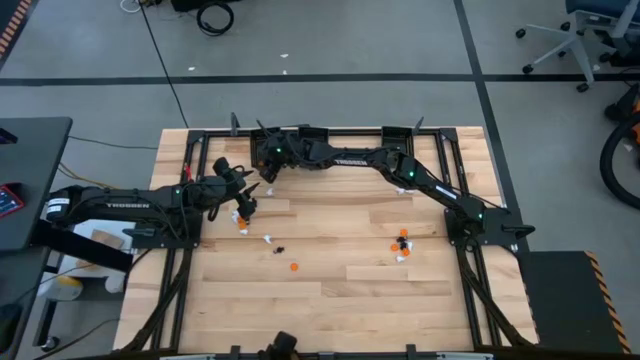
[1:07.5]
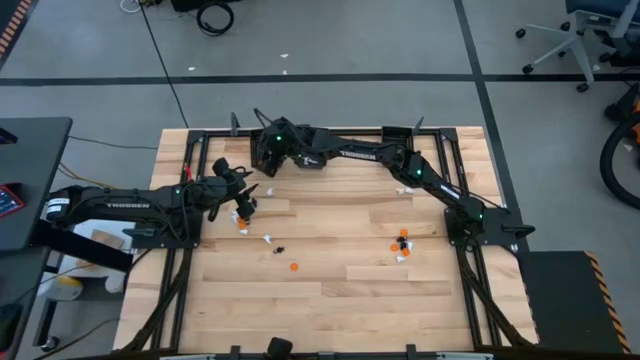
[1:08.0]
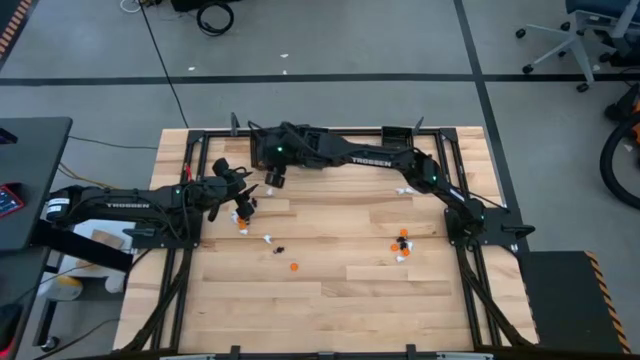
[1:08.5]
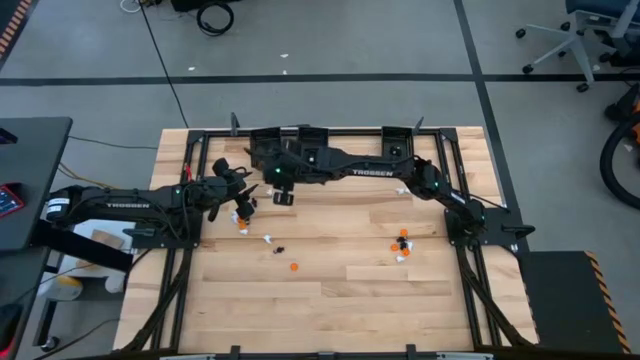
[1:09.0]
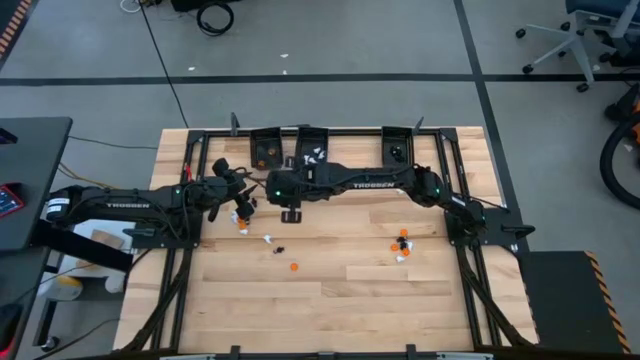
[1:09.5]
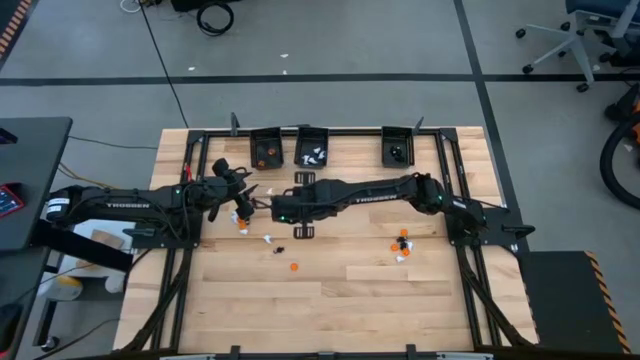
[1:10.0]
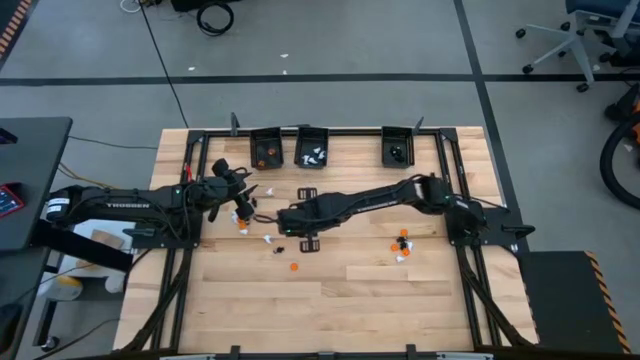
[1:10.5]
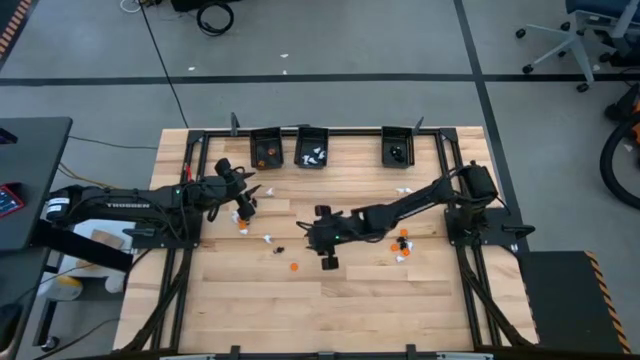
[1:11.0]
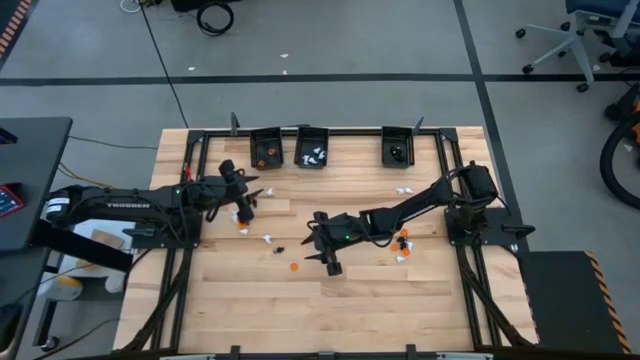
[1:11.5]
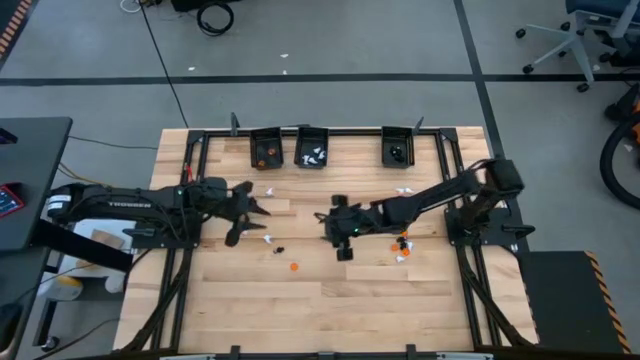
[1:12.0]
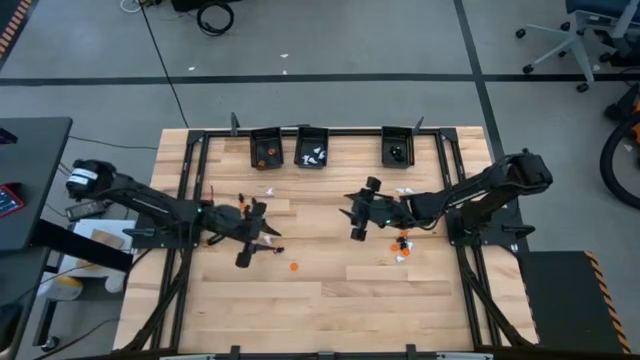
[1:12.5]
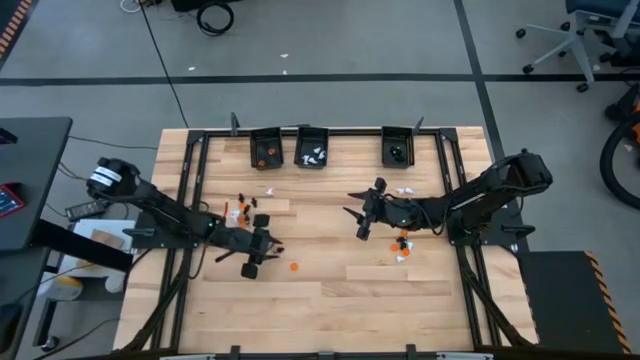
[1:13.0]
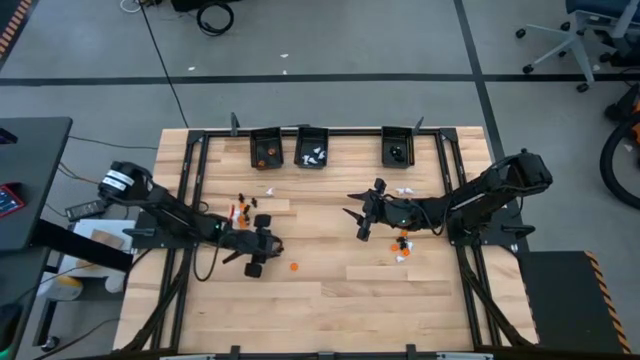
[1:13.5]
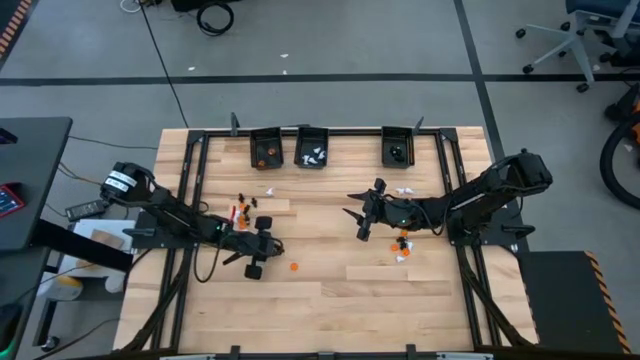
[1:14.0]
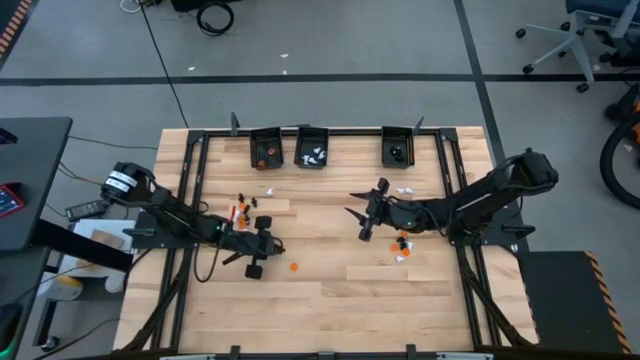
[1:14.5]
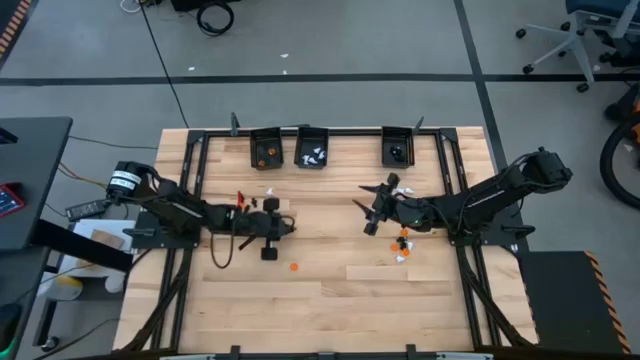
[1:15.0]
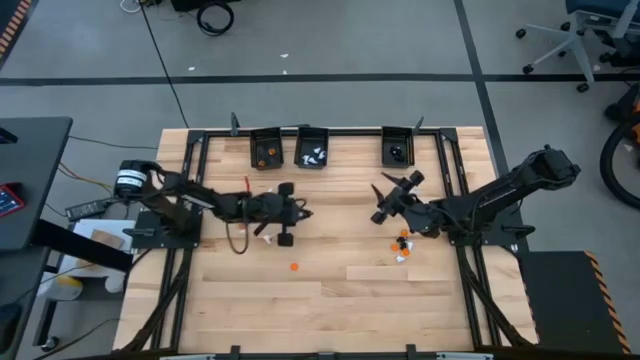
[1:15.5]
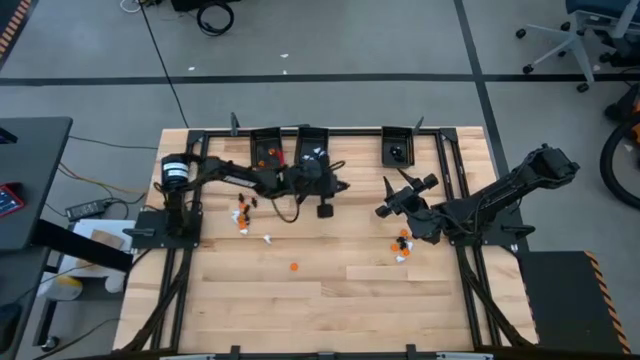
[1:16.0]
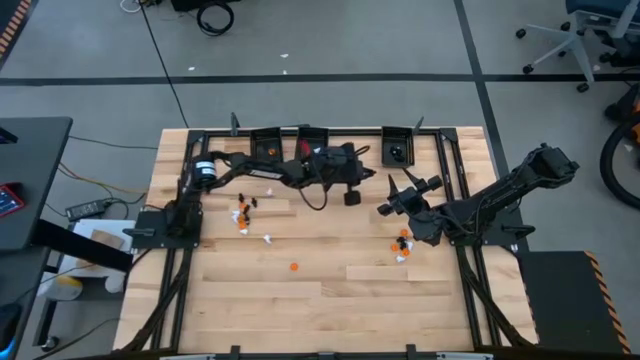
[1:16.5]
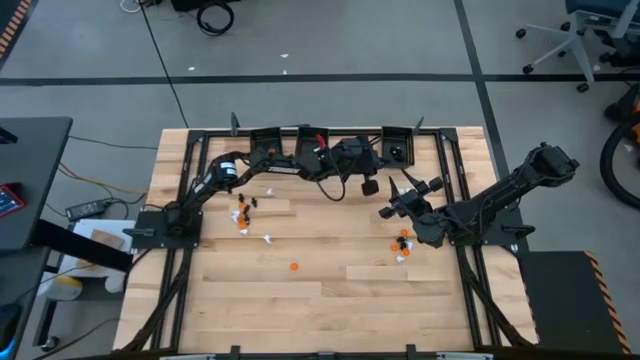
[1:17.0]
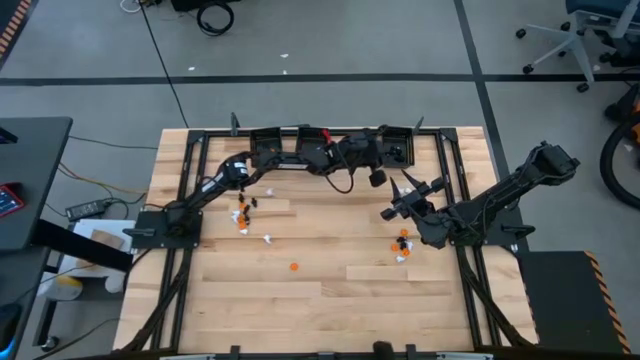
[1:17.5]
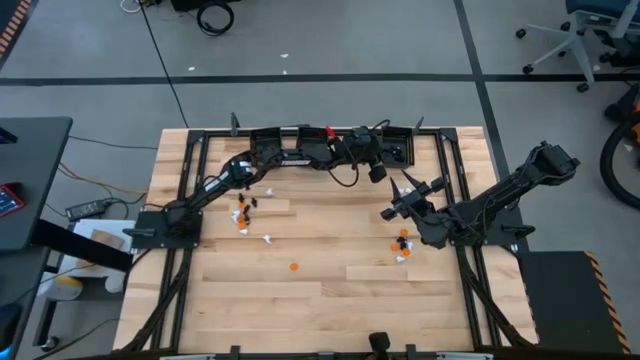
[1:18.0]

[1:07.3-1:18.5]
Task: Sort Halloween decoration
Put the black voodoo toy into the right black bin

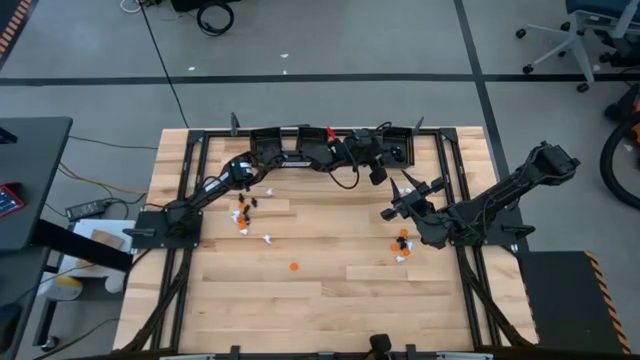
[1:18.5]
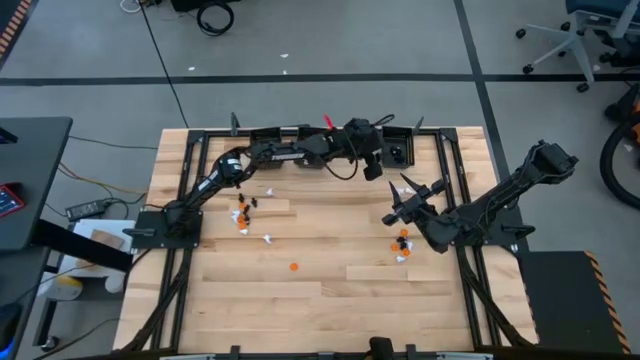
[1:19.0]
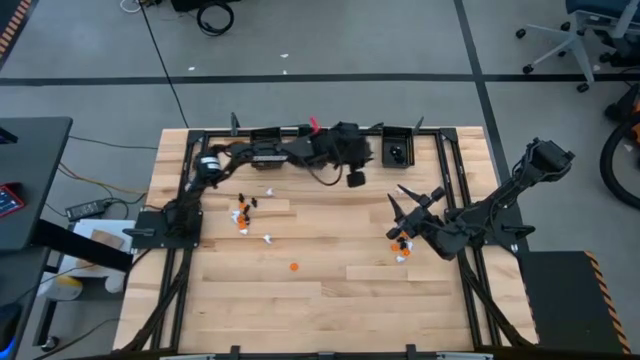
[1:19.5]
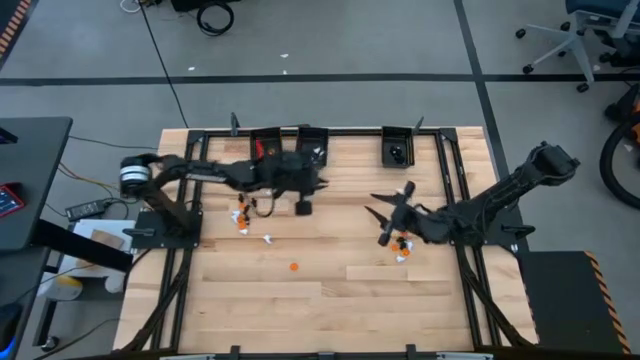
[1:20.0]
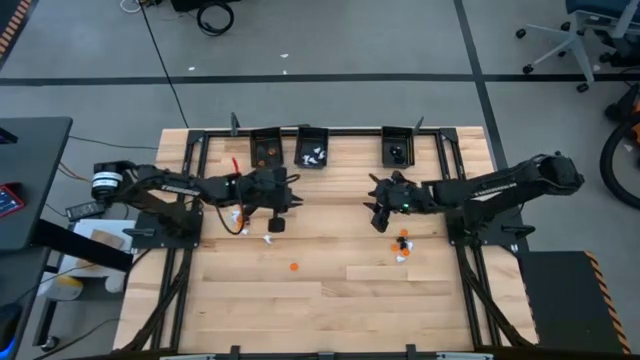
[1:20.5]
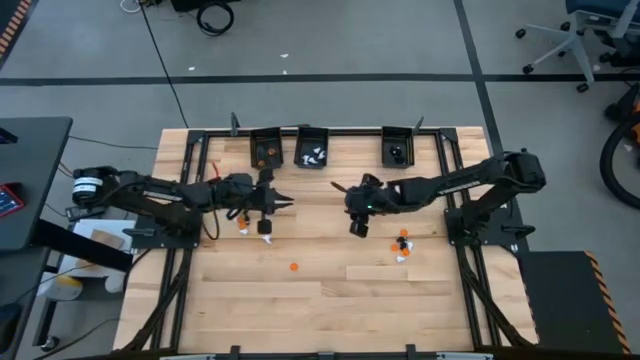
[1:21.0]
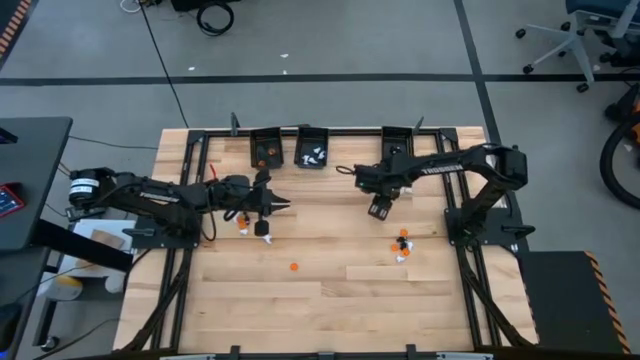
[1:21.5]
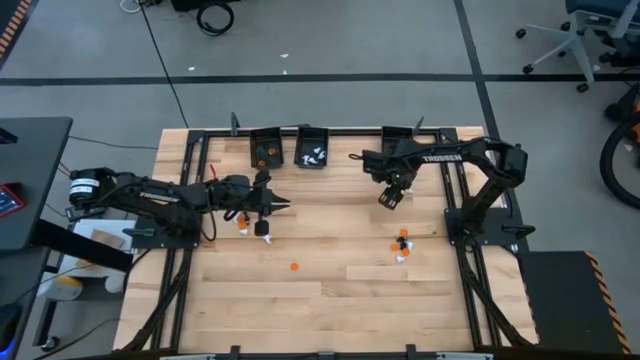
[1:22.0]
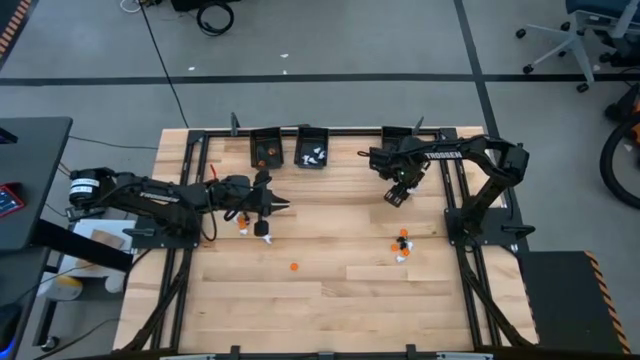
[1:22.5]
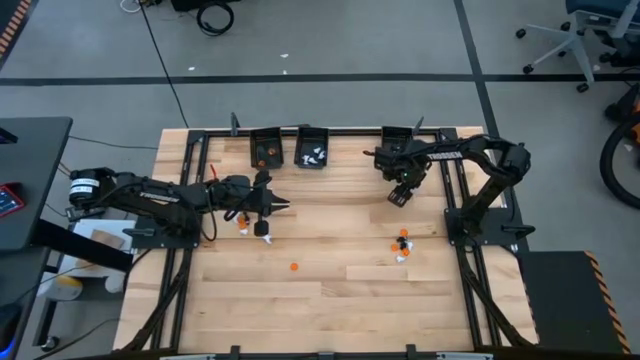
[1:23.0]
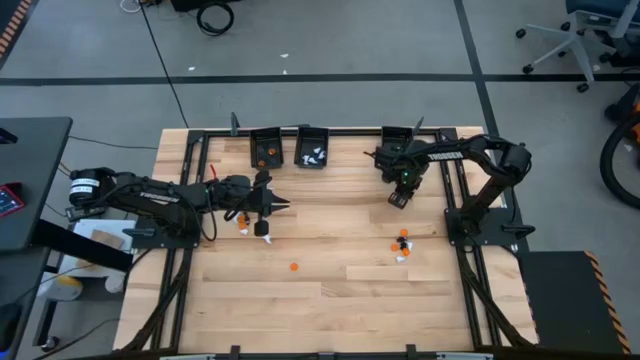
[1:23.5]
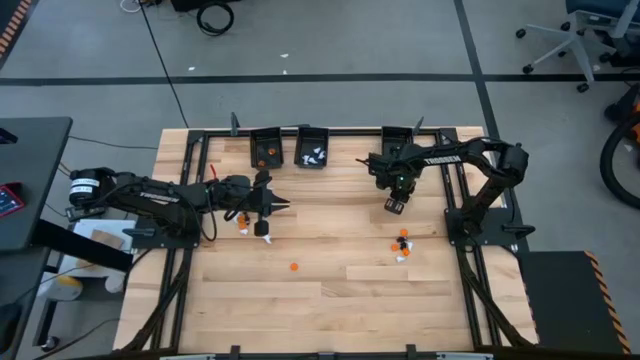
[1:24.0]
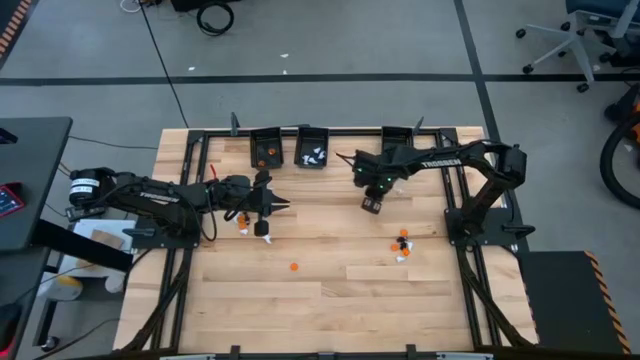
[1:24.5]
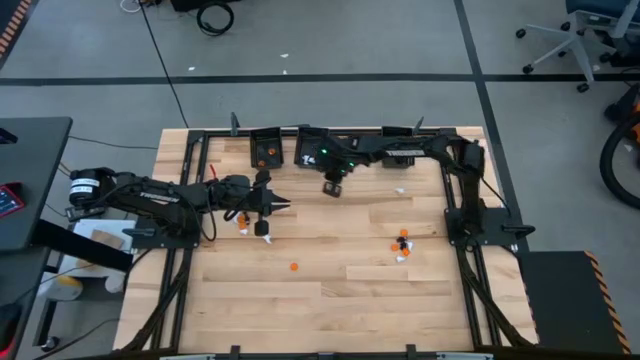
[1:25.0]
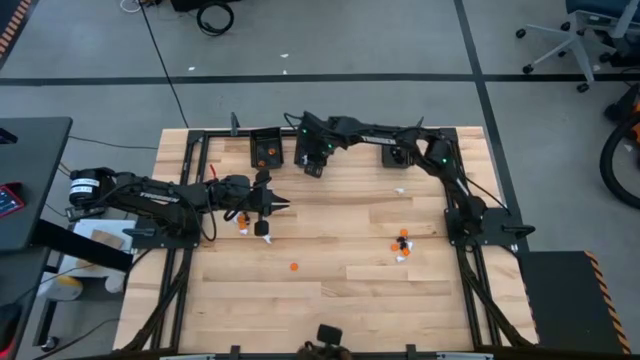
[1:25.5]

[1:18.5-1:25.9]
Put the white ghost toy into the middle black bin

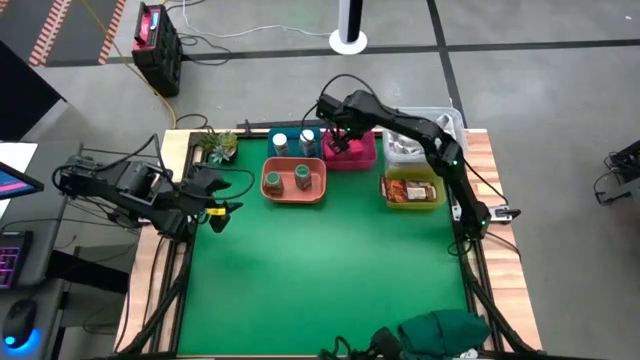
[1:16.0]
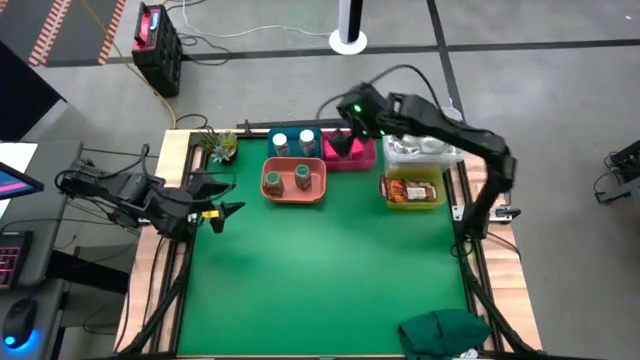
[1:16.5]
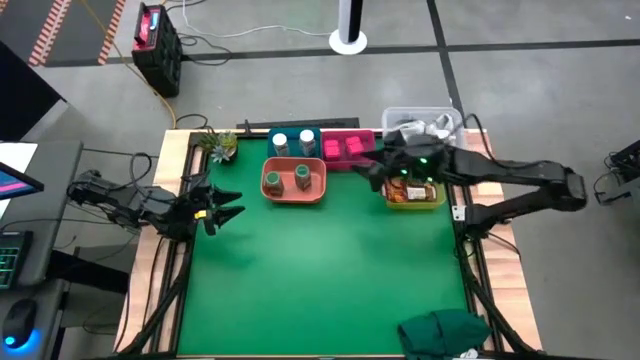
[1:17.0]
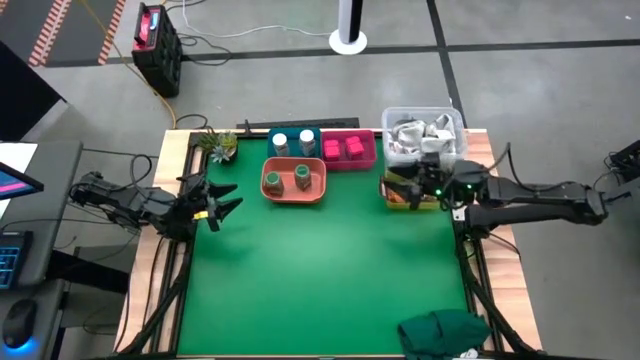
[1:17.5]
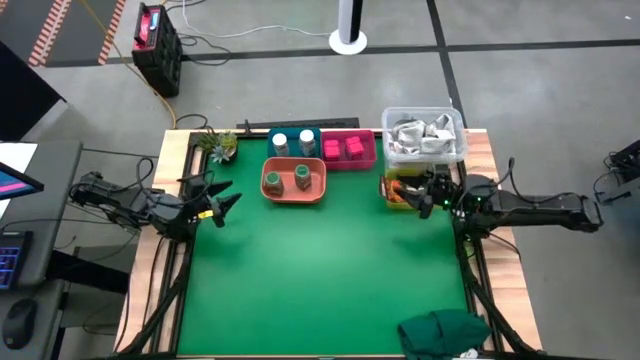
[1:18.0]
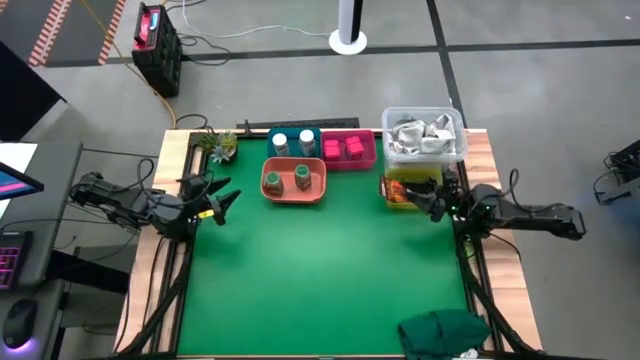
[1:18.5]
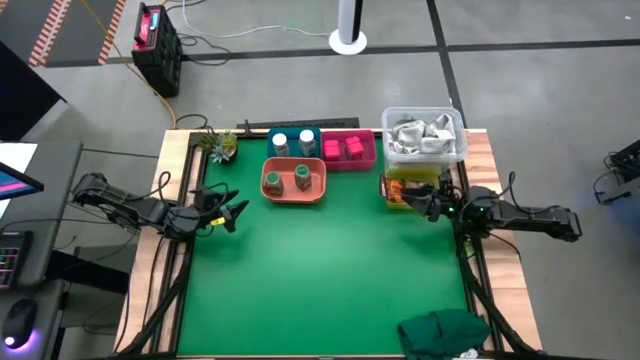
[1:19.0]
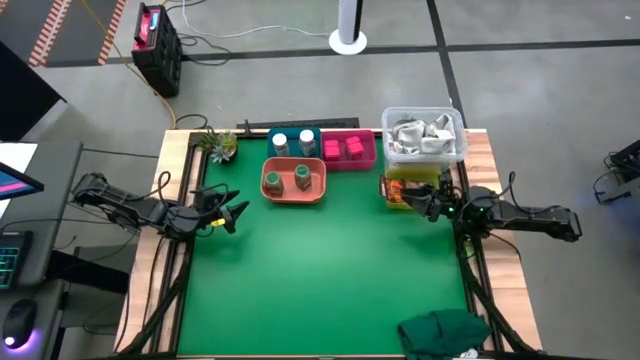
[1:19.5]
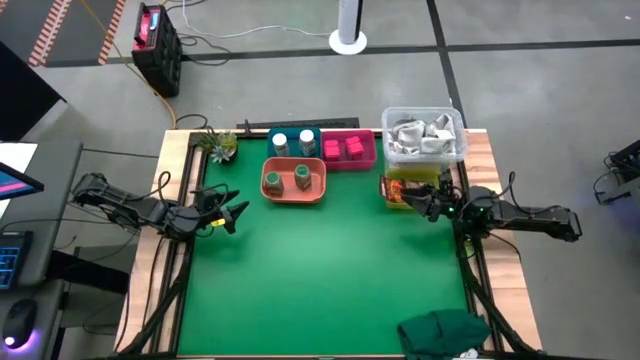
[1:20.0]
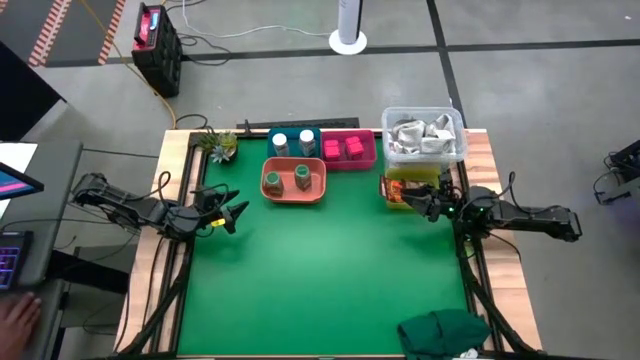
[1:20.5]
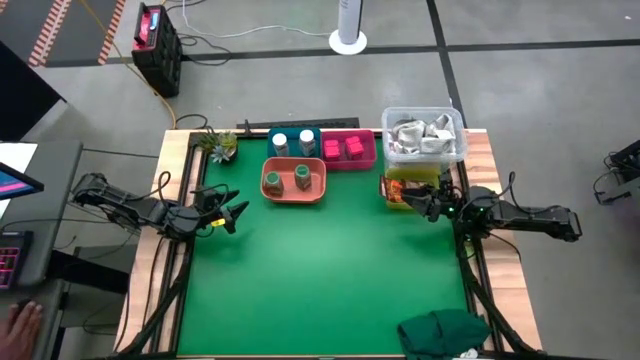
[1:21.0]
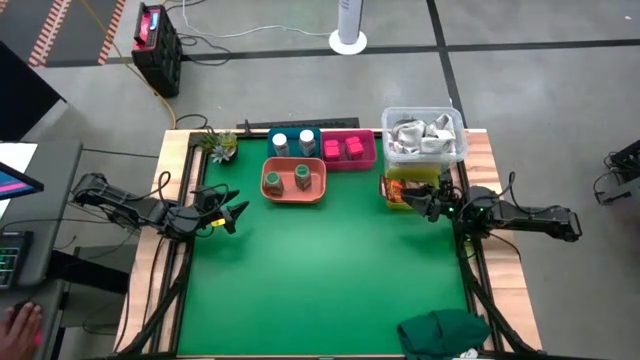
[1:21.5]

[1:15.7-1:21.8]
Task: Sort spices by type
Return to Home Position
